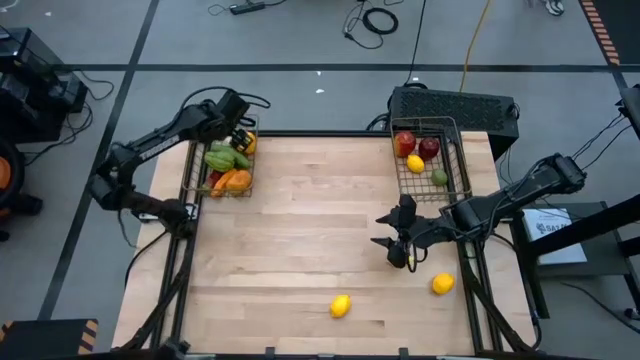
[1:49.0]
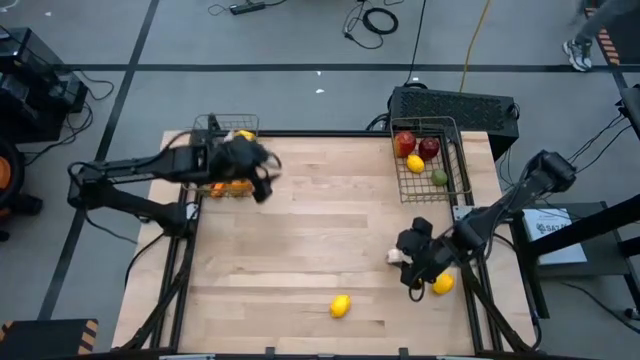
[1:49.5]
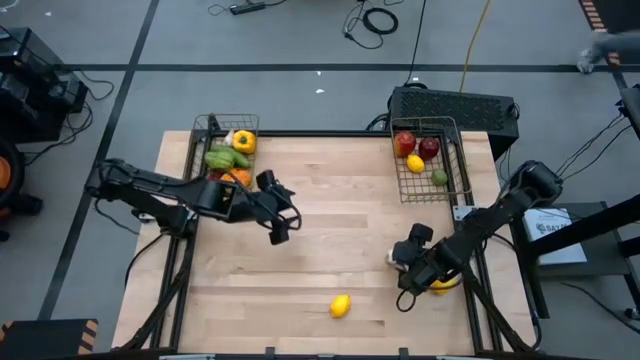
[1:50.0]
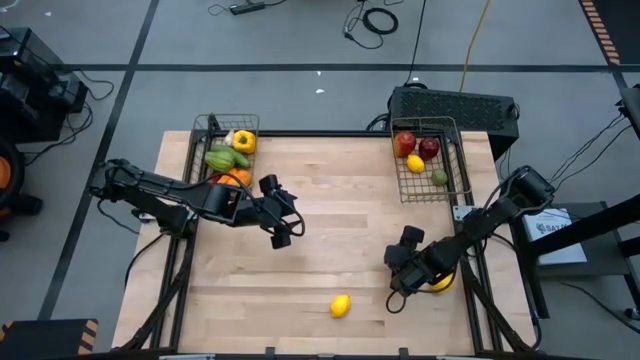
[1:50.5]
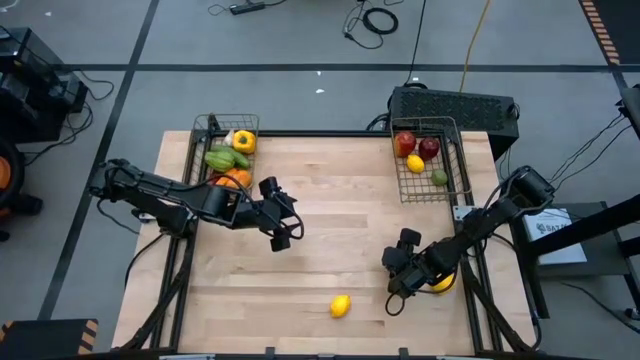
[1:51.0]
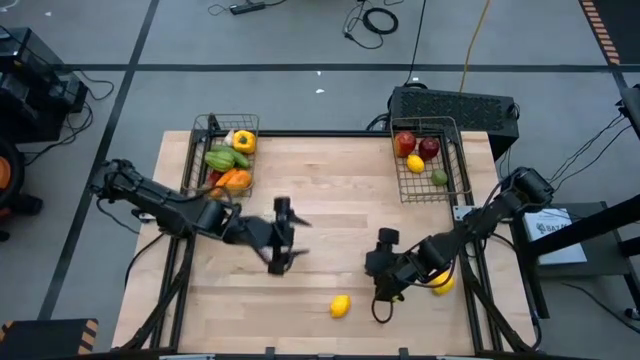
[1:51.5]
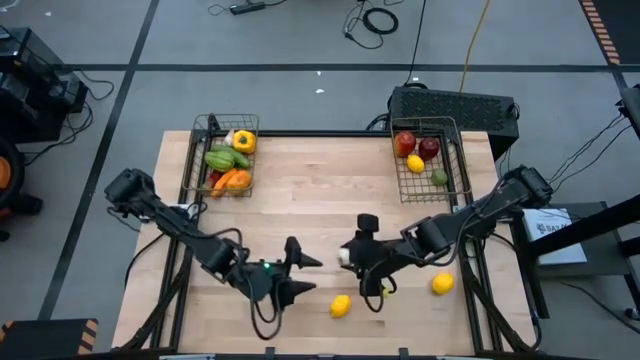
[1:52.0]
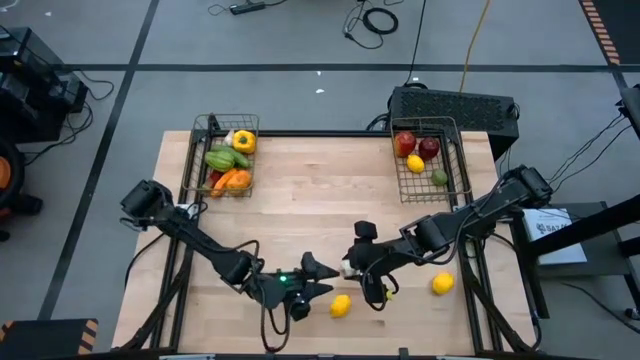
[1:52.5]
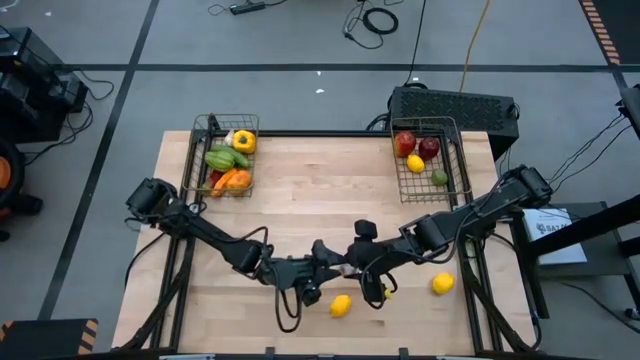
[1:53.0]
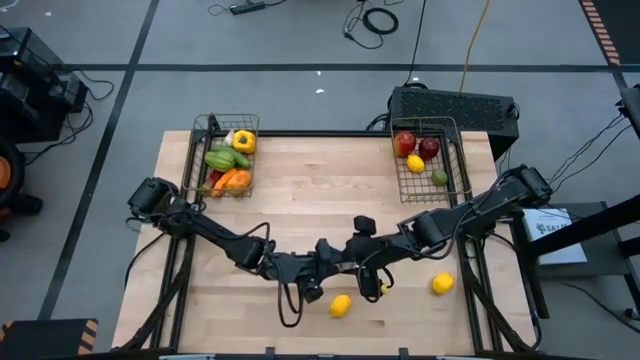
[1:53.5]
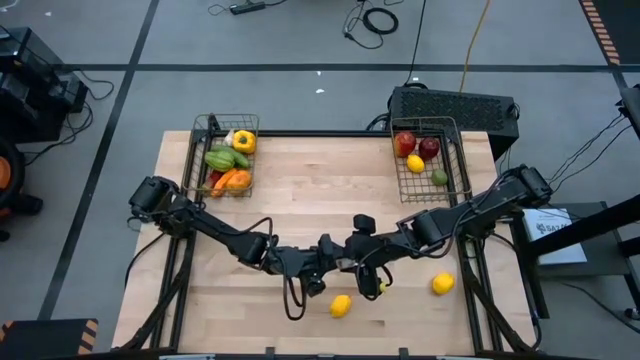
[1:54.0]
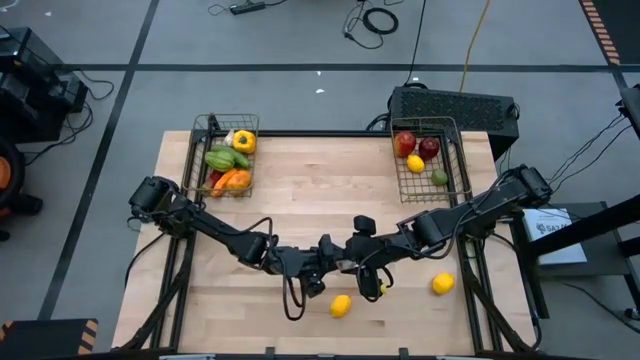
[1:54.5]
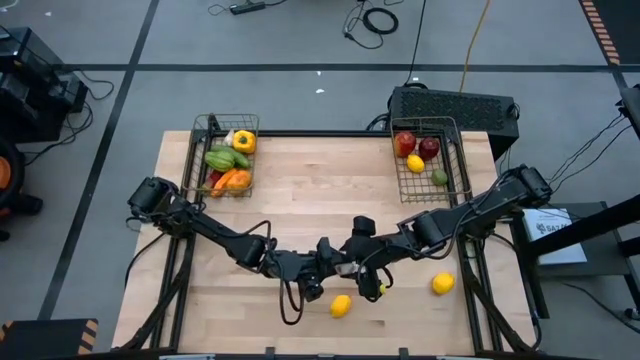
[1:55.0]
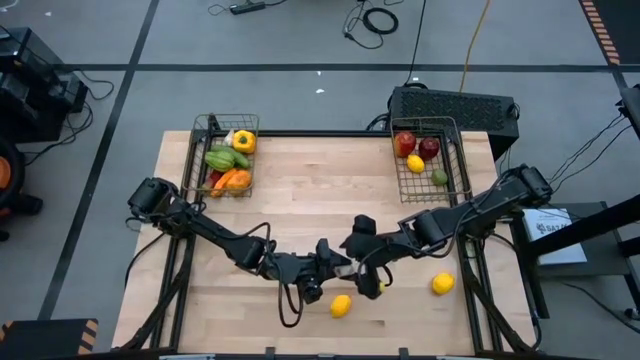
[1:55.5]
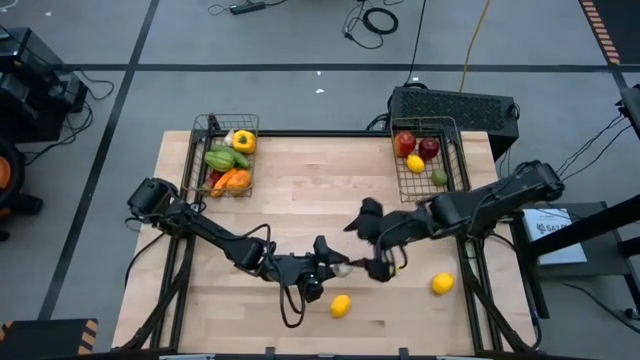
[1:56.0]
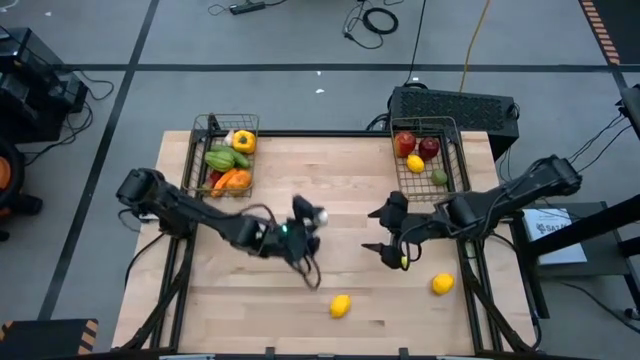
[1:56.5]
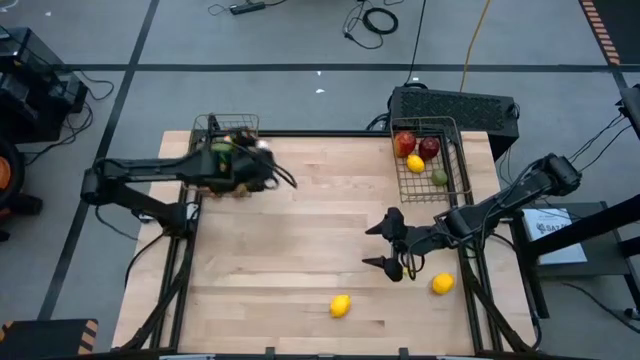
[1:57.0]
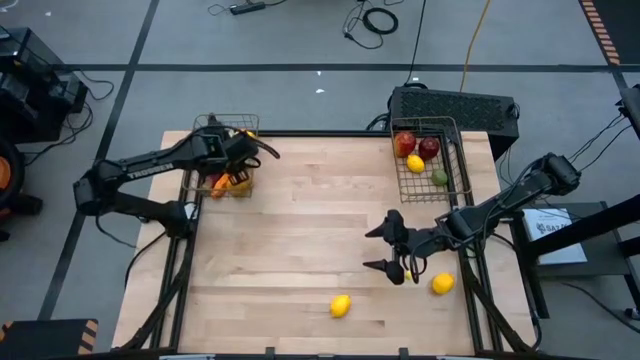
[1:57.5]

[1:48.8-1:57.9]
Task: Sort produce into baskets
Put the white garlic into the left wire basket

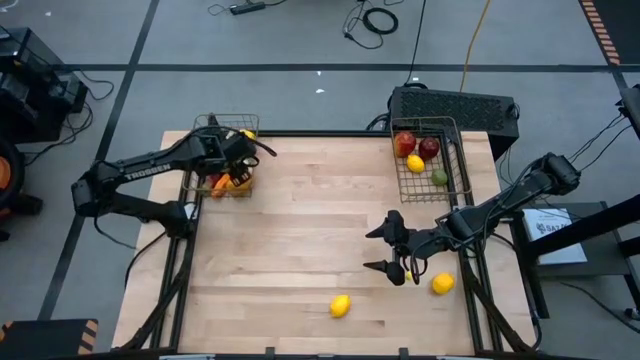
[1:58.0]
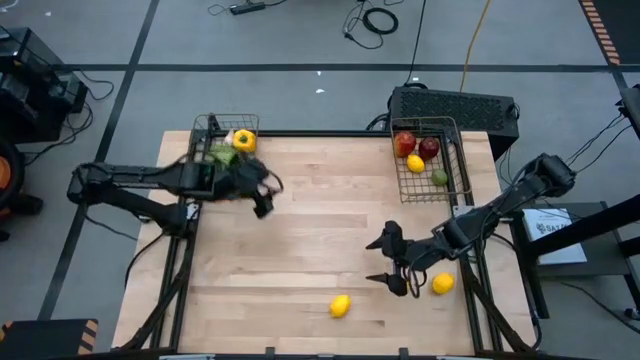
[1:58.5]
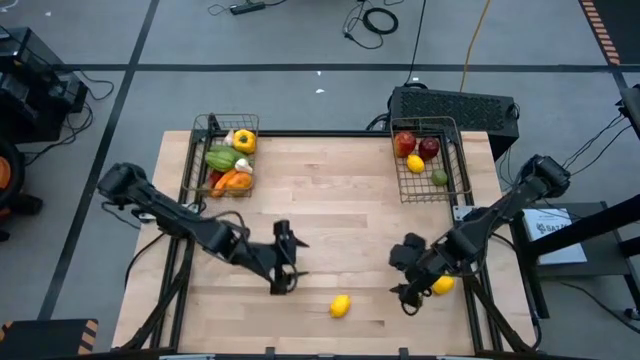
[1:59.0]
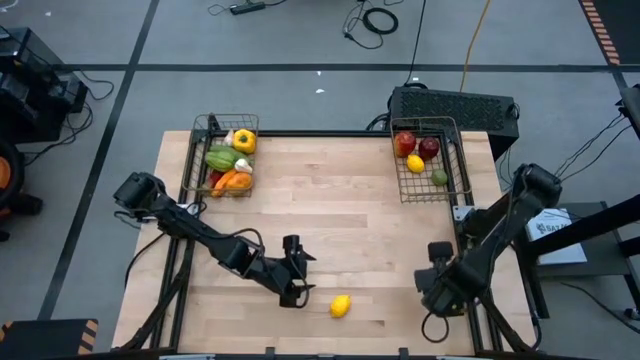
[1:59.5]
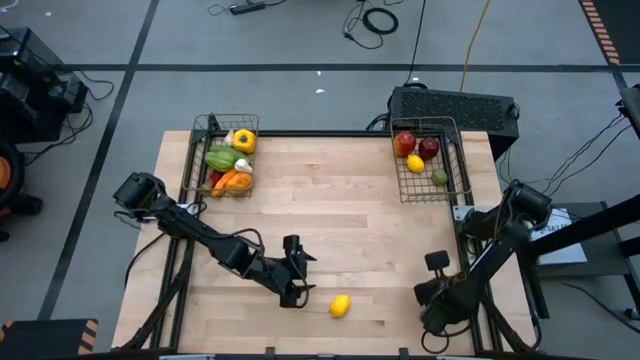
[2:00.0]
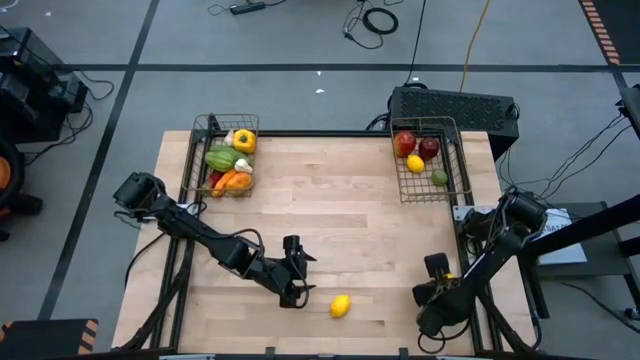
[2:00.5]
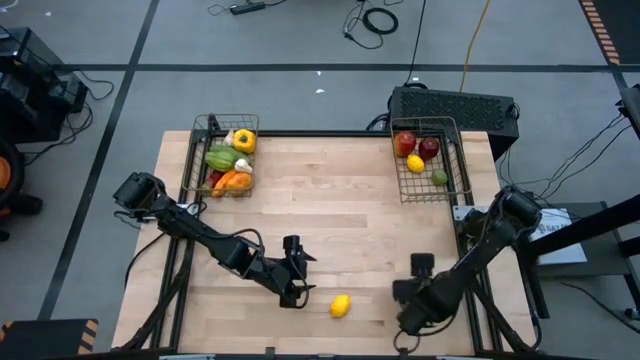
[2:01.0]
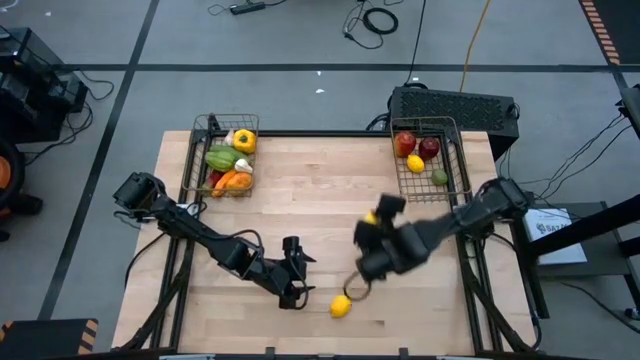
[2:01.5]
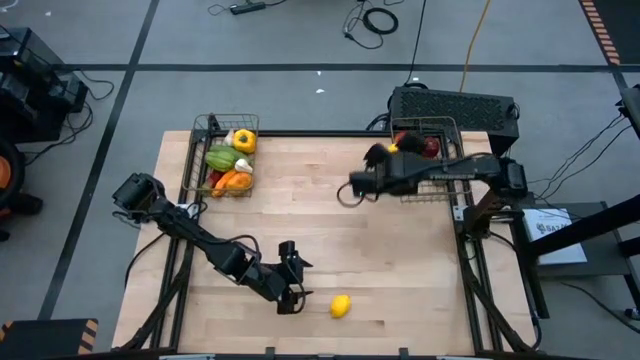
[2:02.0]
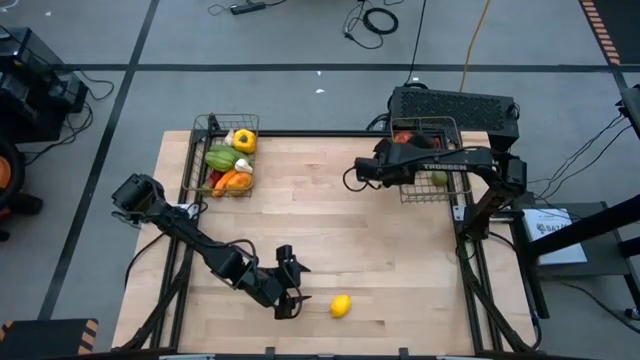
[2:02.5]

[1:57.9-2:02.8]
Put the right yellow lemon into the right wire basket

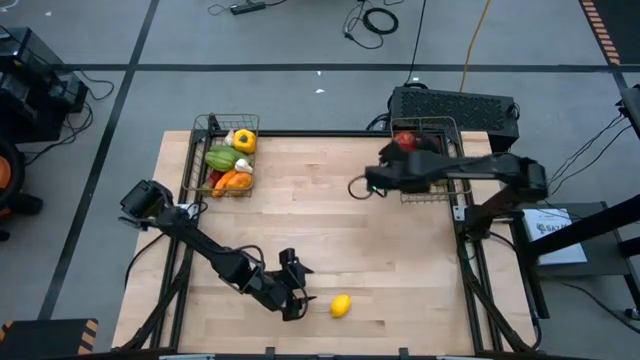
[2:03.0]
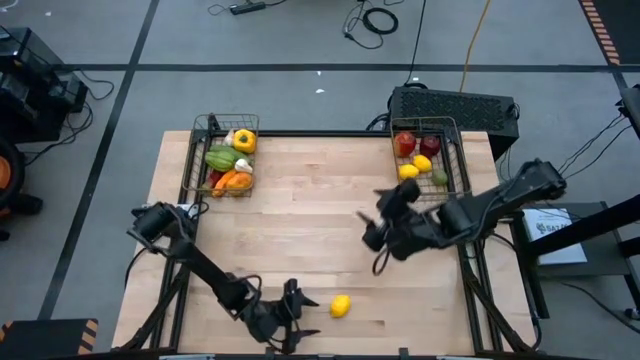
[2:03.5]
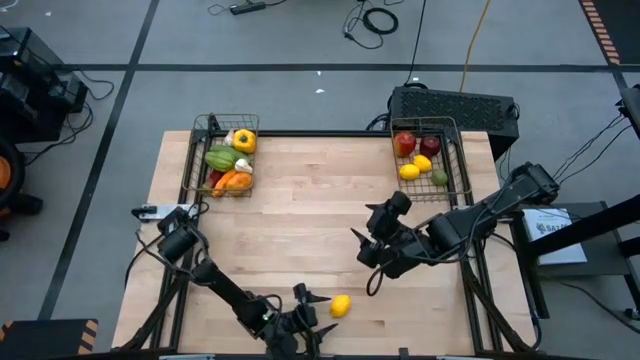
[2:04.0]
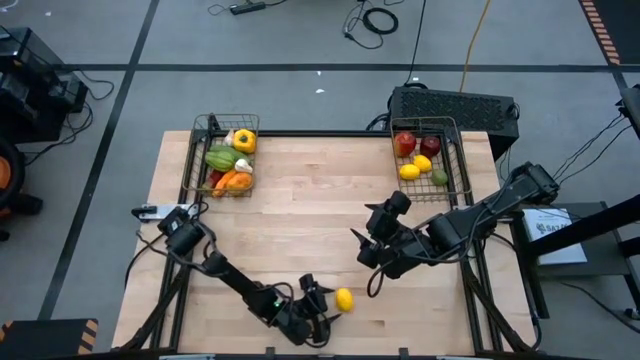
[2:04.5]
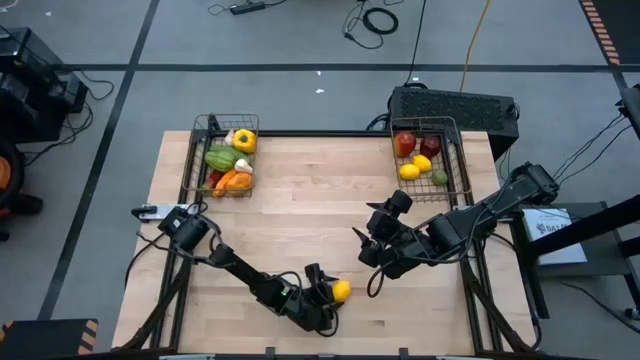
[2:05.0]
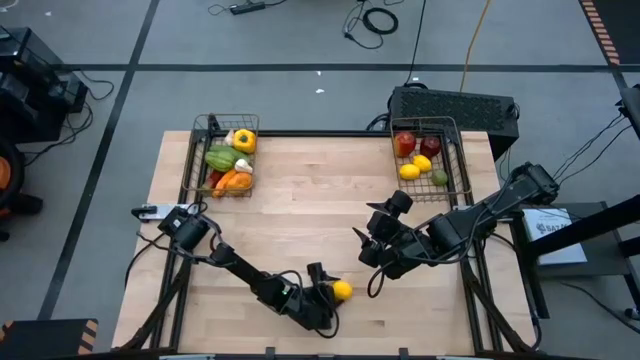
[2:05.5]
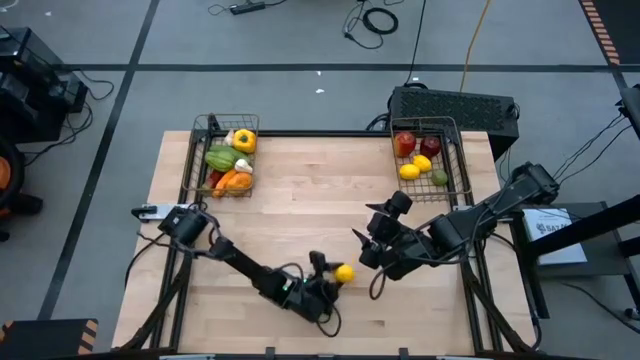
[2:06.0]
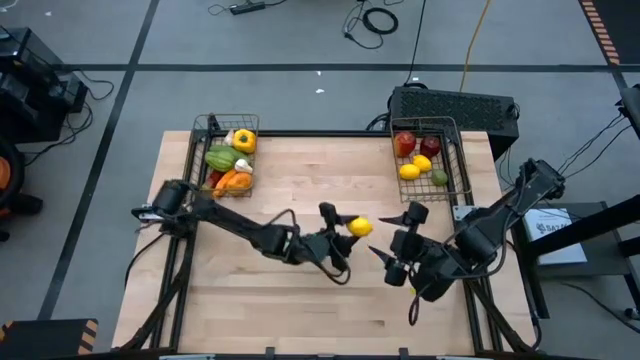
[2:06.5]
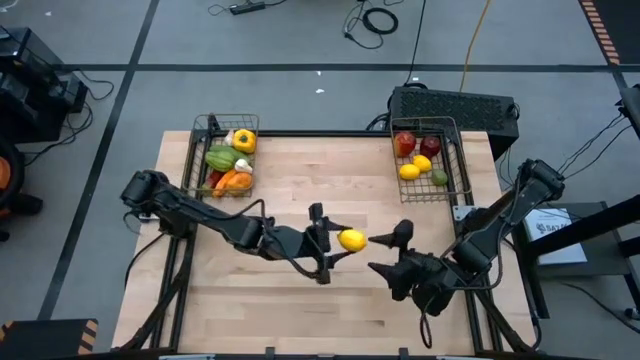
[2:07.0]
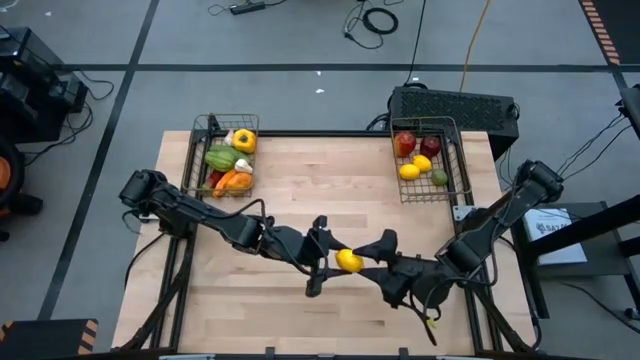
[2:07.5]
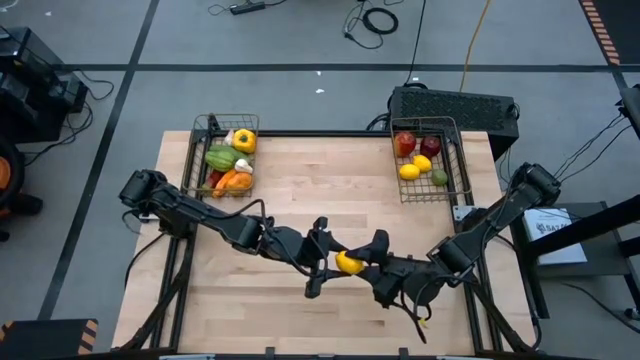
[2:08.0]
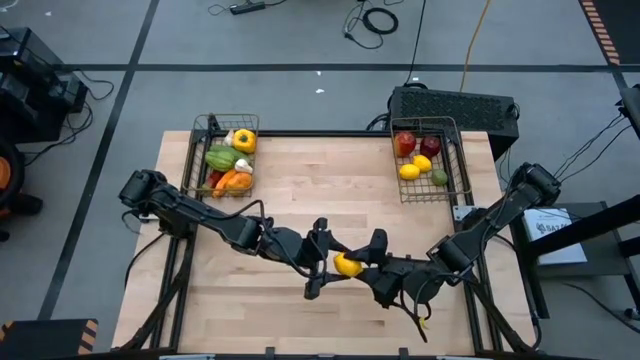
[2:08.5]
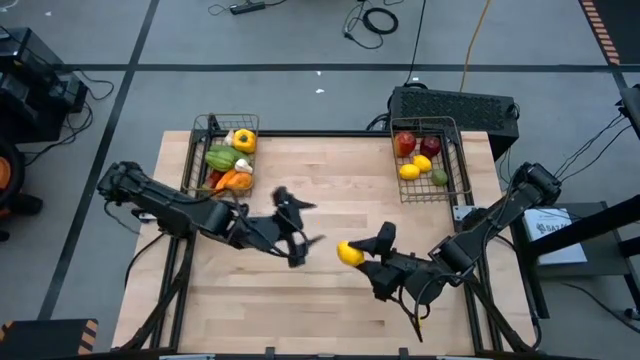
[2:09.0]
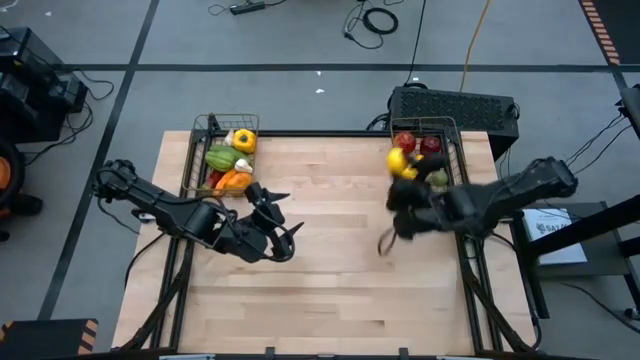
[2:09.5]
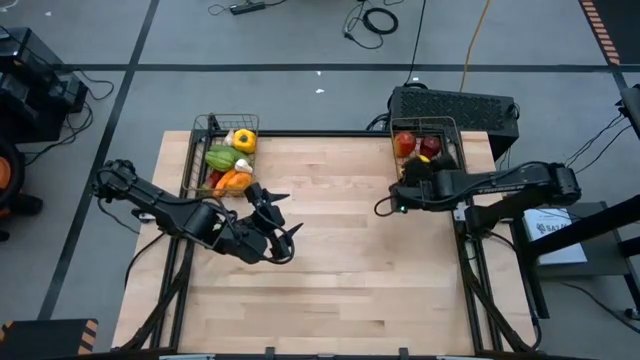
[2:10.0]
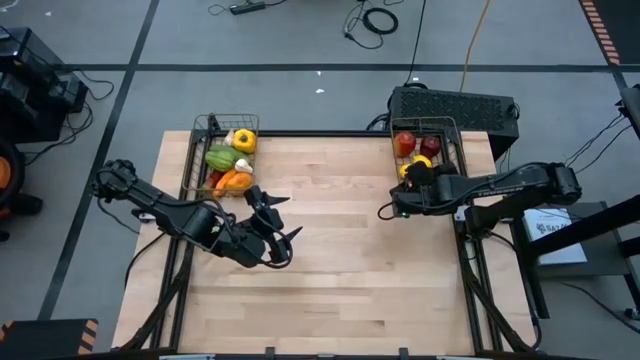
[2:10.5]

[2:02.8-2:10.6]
Put the yellow lemon into the right wire basket
